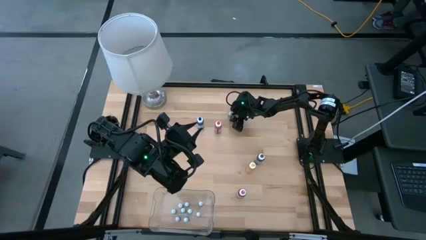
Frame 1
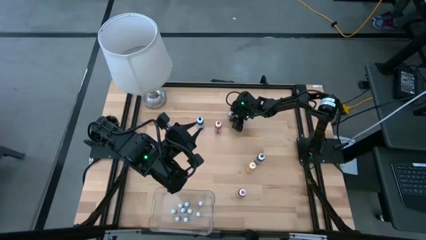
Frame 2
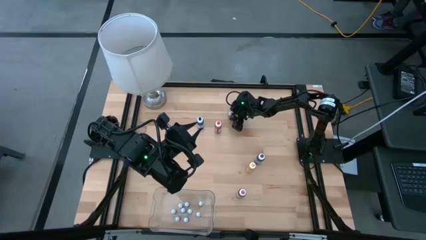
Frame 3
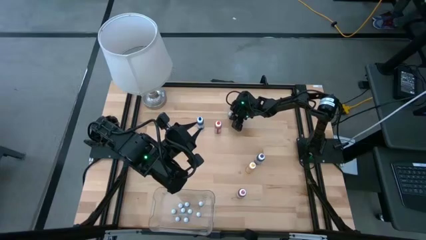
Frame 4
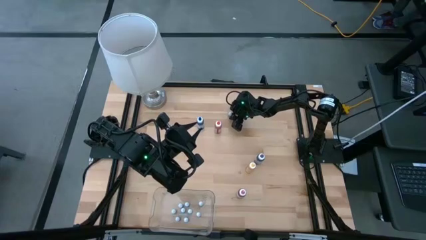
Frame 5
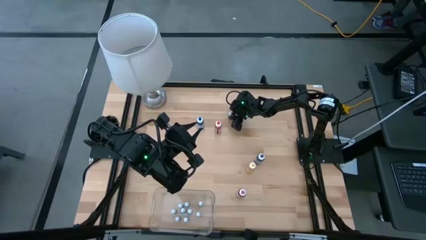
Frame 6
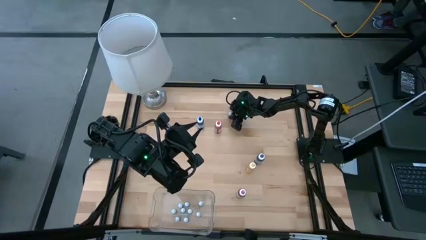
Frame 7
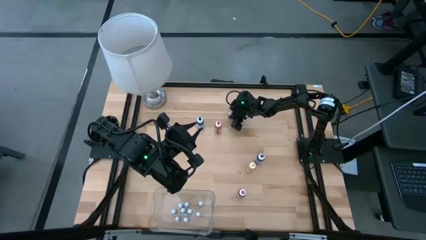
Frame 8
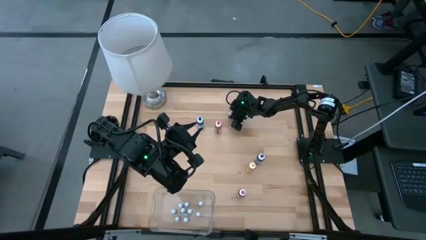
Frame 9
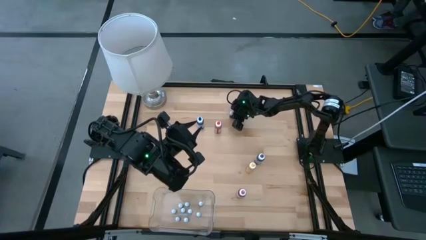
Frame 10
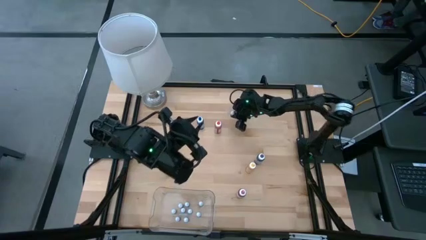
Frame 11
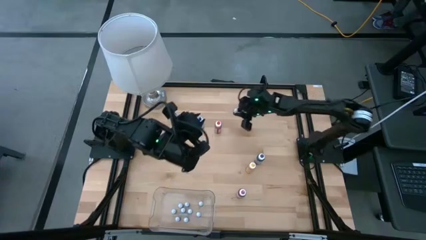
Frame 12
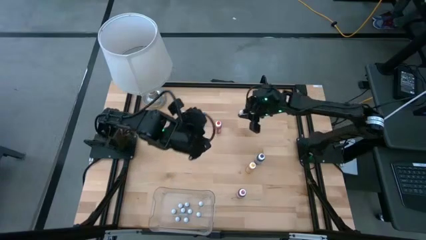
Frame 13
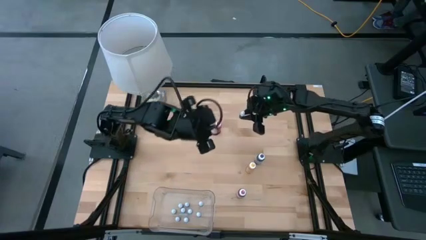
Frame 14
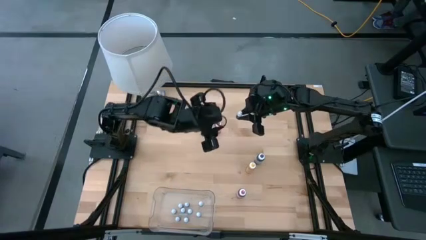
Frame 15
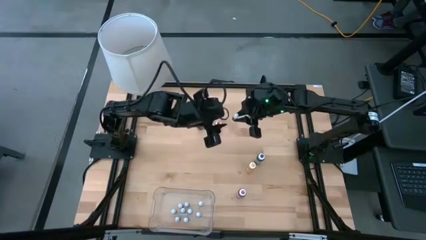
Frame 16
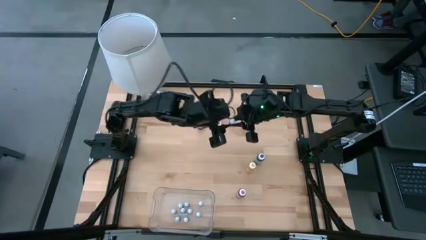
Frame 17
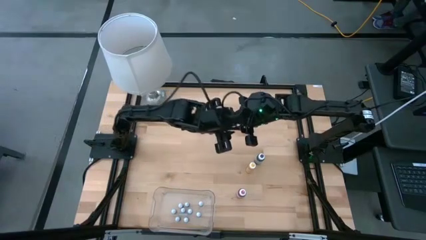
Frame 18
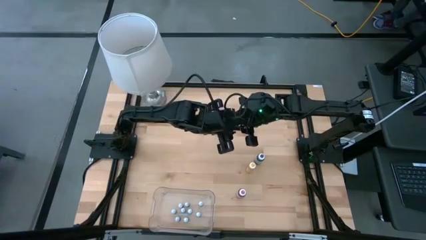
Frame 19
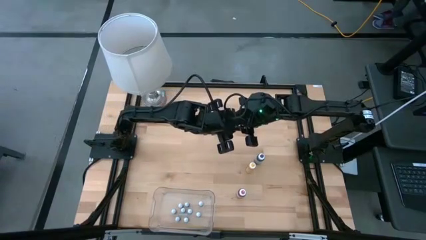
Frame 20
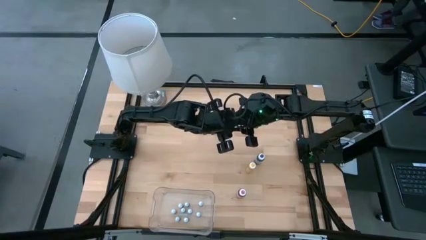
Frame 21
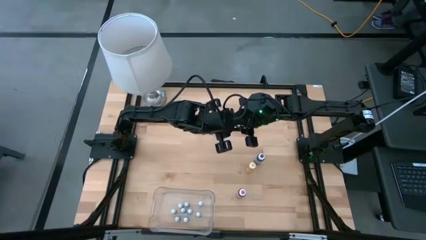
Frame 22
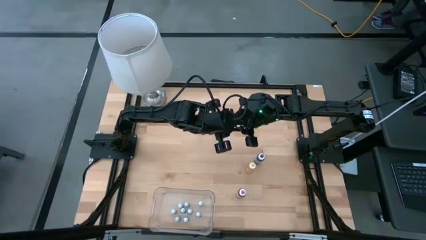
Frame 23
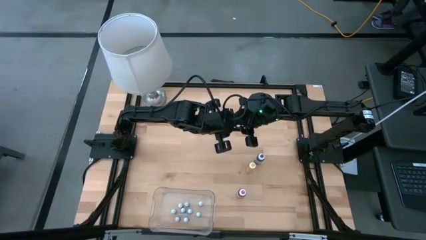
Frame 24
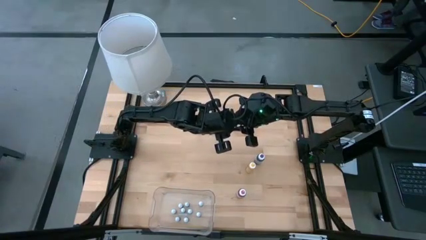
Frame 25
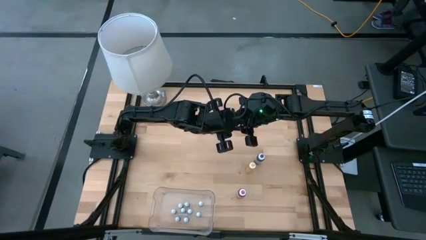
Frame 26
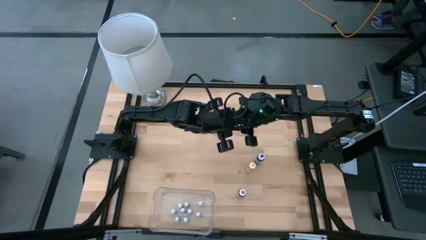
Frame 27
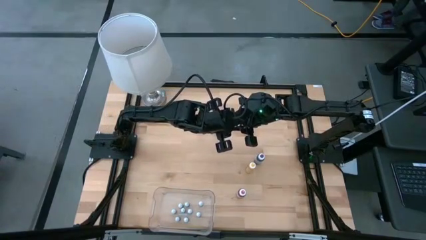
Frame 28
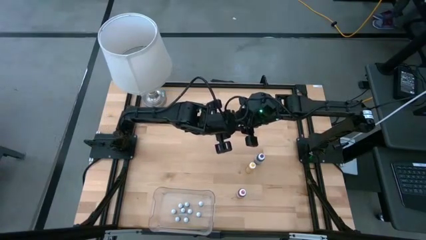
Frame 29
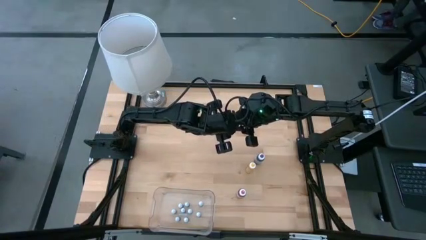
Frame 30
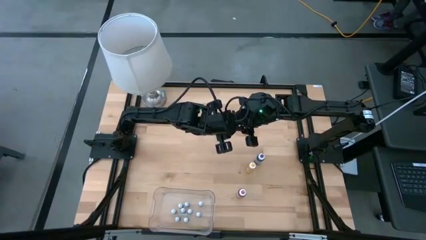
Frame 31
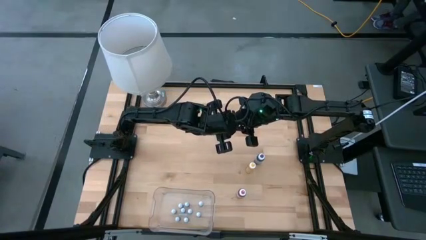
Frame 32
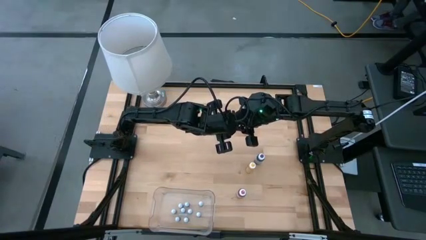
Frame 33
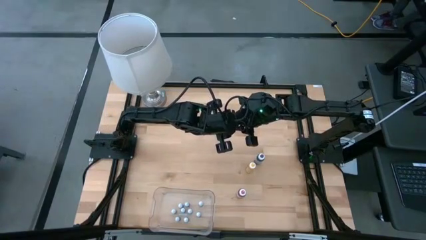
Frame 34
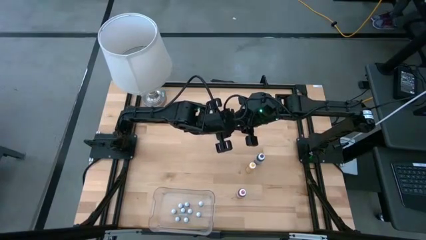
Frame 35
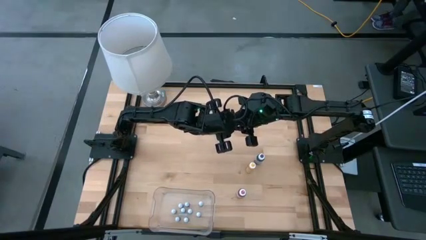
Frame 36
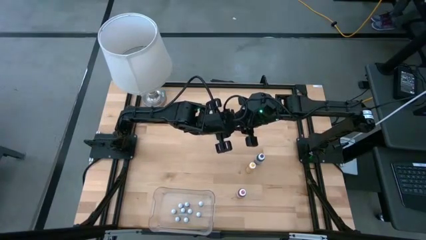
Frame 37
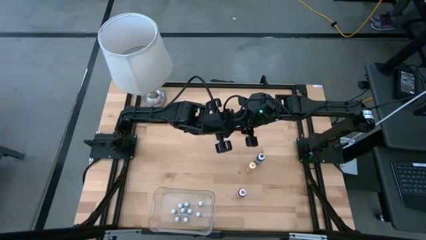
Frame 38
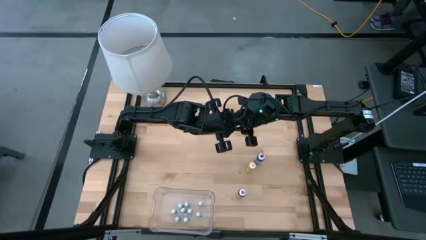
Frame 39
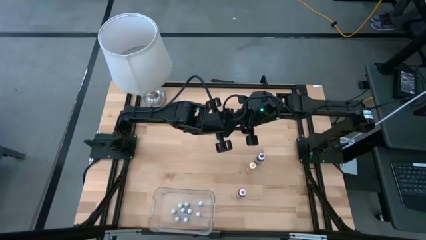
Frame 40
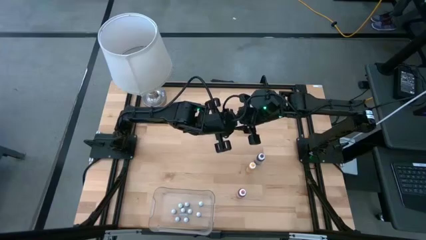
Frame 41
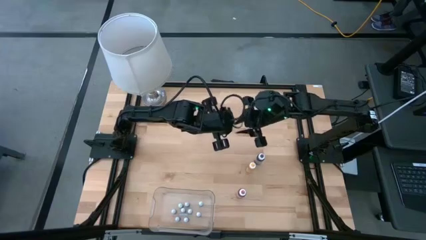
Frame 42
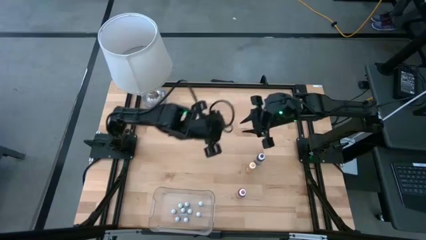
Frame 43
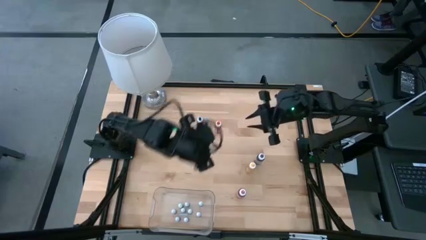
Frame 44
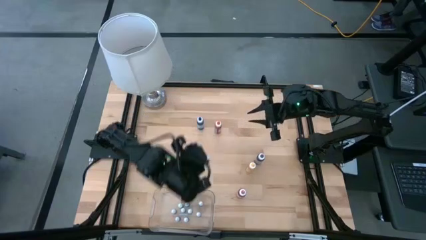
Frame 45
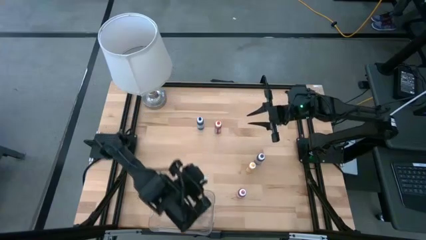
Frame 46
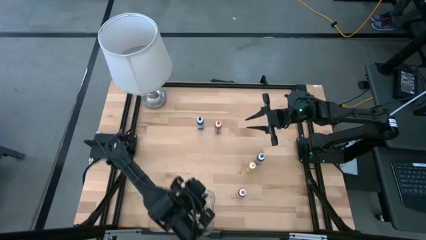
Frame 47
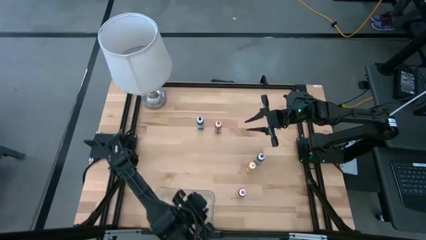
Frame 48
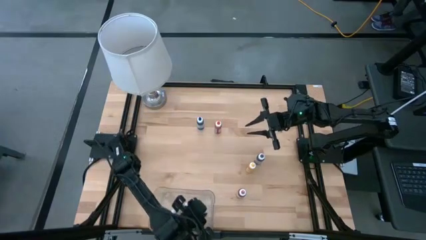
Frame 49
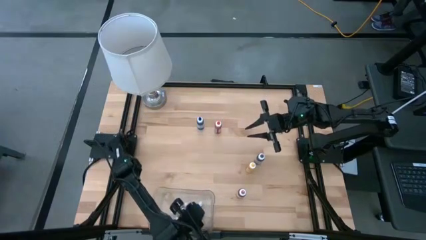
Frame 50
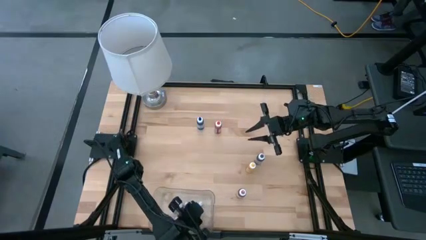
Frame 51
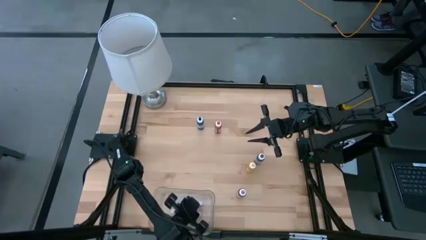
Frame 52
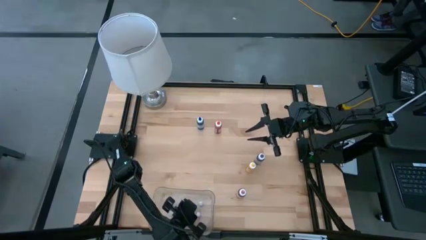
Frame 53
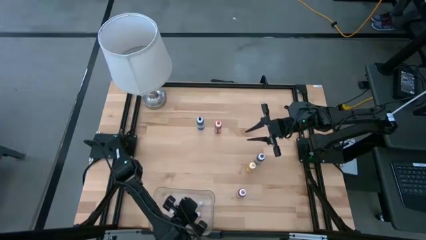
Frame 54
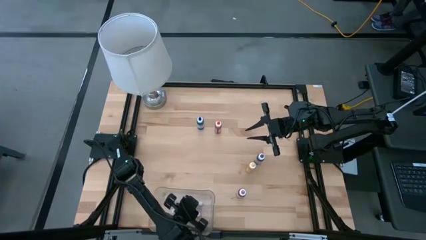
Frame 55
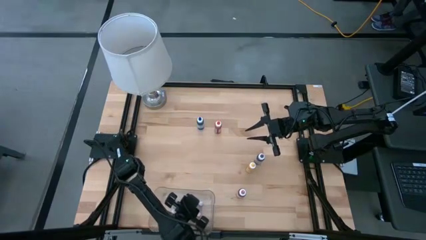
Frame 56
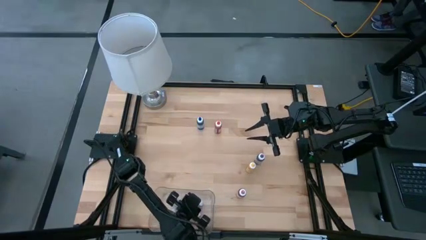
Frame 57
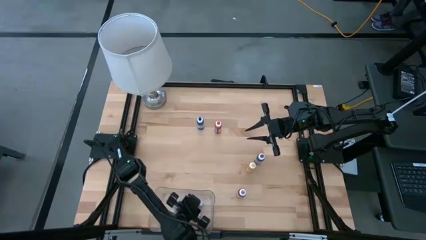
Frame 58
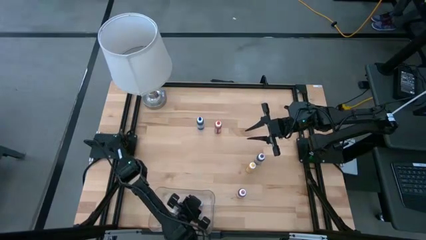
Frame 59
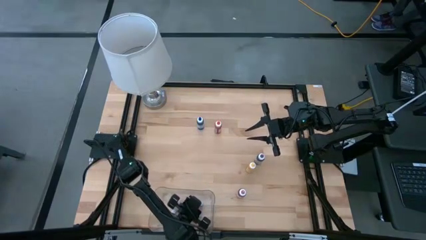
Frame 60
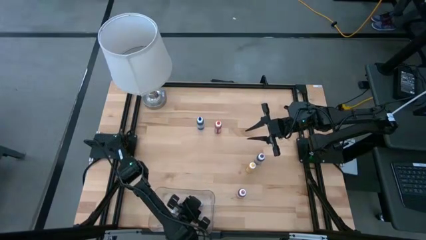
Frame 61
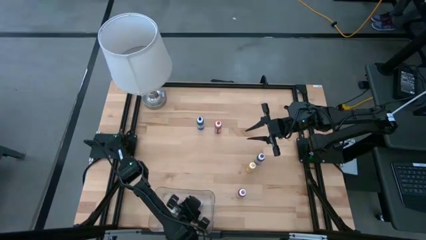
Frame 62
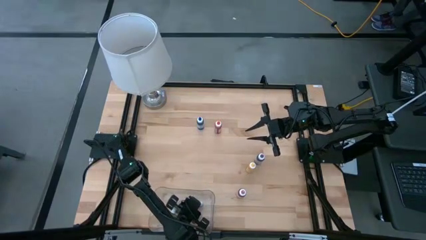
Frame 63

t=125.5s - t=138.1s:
Task: Pick & Place food coloring
Put the small green food coloring bottle into the bin

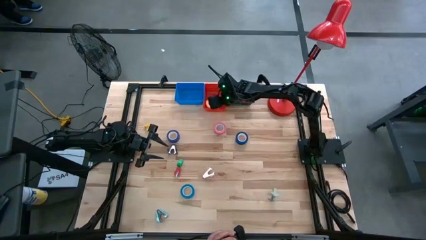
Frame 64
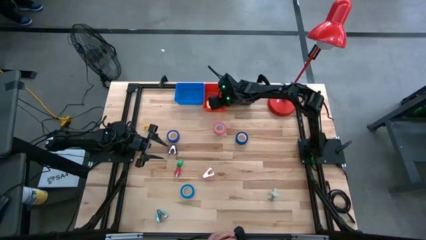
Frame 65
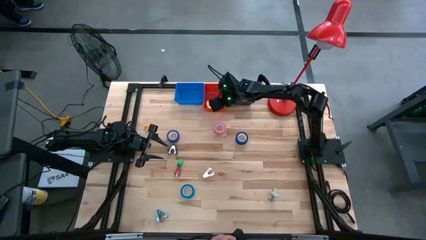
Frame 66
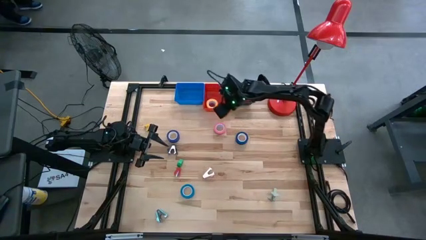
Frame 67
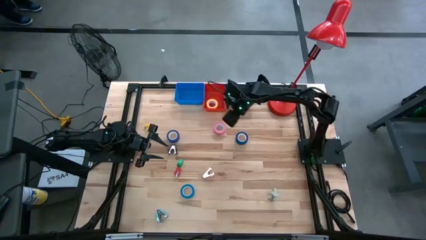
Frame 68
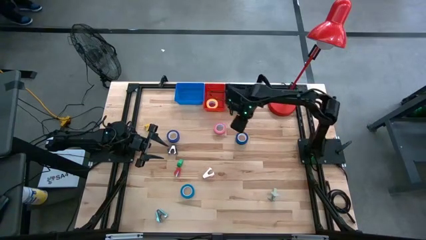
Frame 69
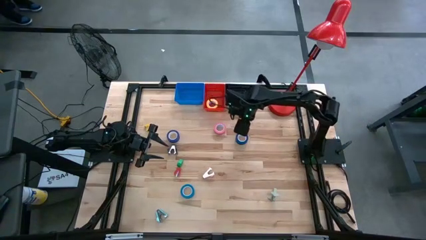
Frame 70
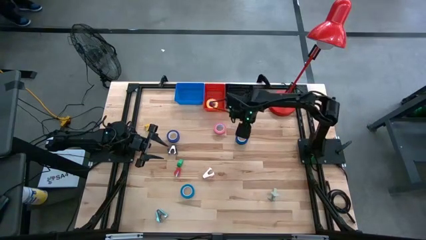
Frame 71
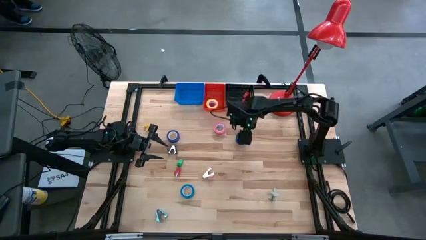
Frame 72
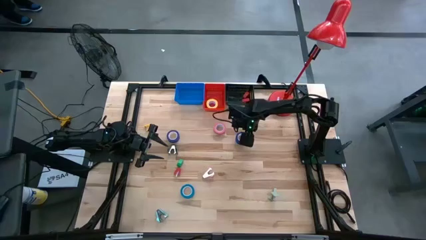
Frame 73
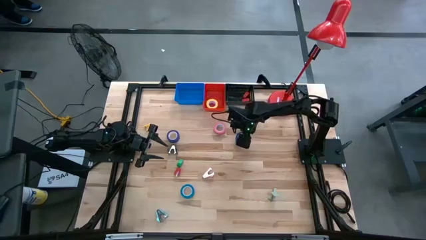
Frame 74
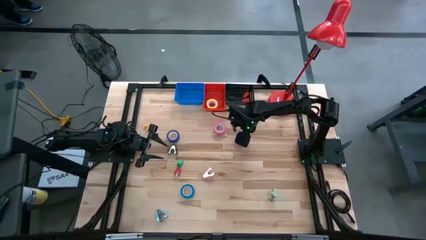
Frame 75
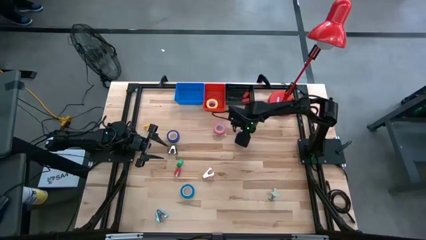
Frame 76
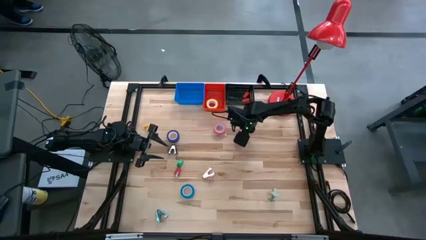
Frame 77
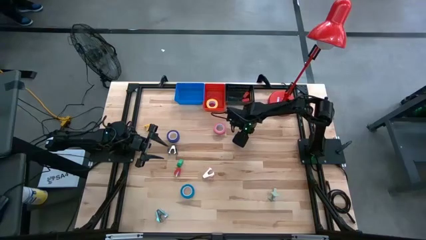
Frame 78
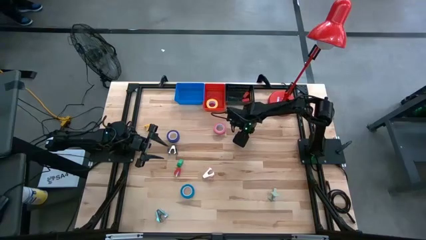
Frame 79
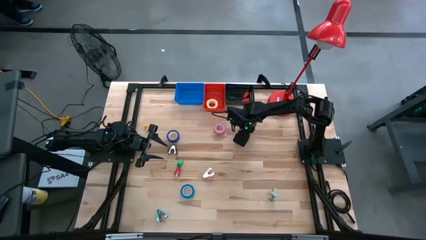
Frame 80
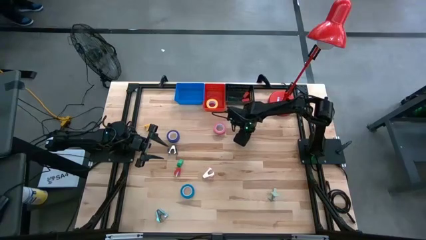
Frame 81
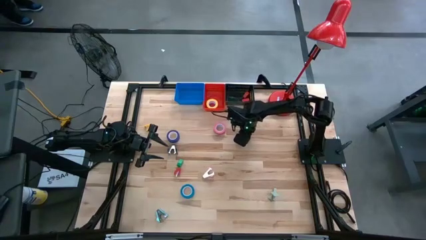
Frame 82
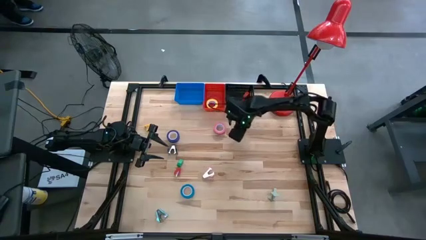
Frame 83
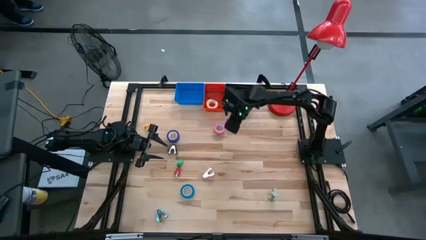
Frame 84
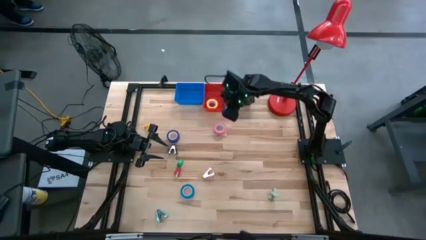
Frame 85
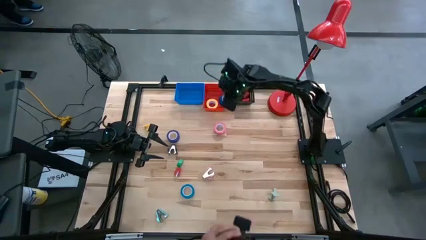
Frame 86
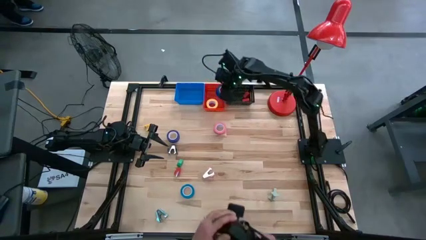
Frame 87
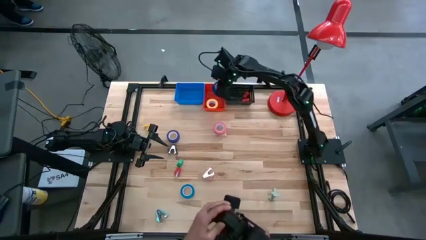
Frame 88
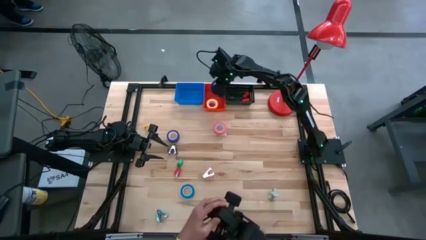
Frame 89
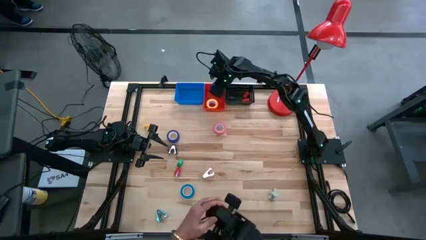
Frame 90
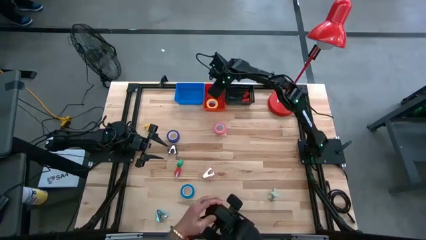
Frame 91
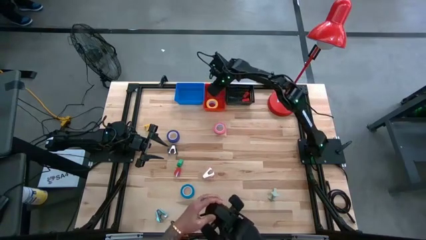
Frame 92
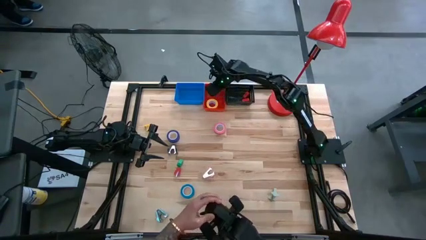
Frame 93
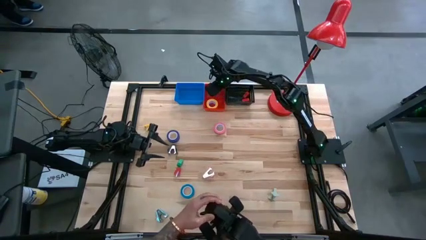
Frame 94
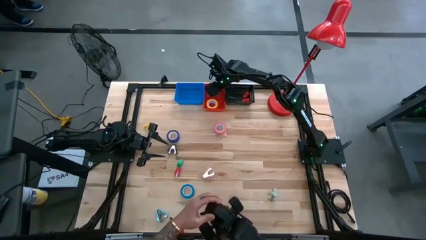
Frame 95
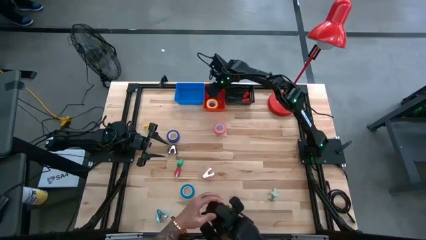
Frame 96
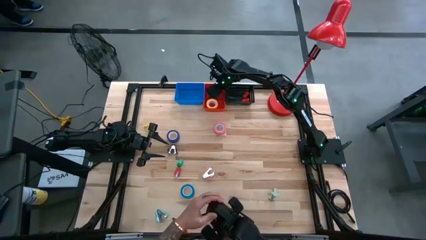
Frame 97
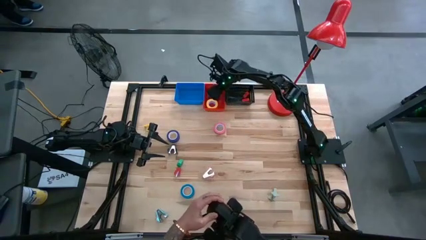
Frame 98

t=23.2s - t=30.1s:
Task: Pick and place Stapler, Stapler remover, tape
Put the right blue tape into the red basket
